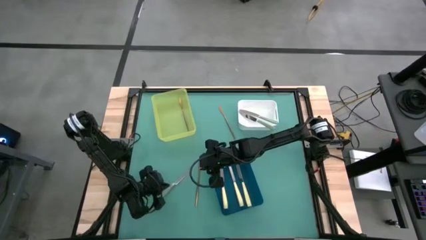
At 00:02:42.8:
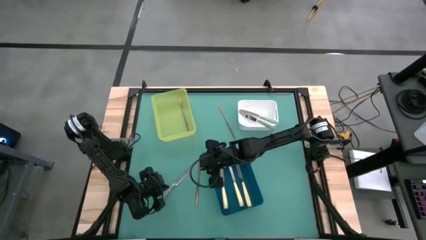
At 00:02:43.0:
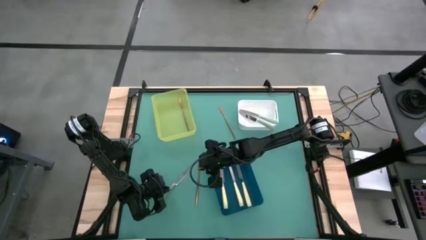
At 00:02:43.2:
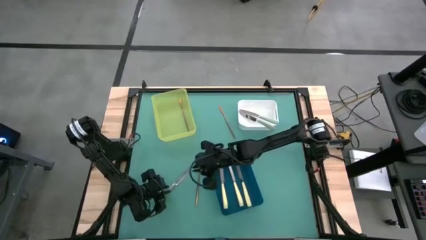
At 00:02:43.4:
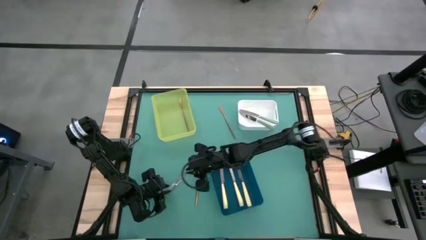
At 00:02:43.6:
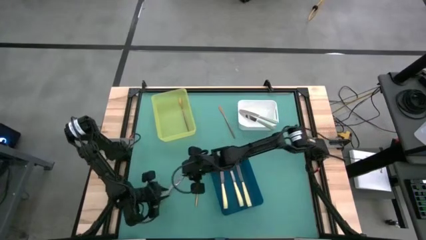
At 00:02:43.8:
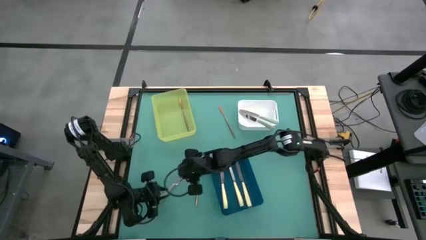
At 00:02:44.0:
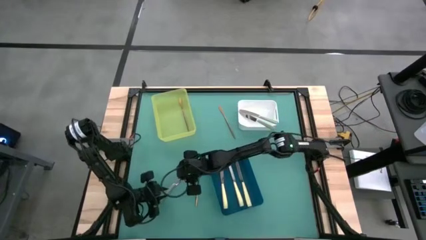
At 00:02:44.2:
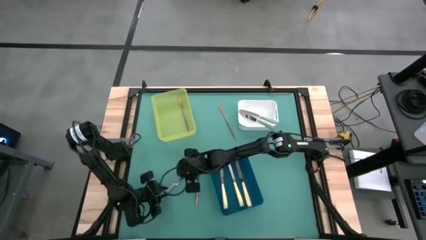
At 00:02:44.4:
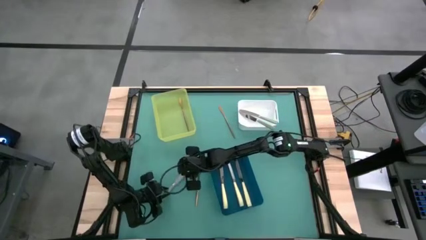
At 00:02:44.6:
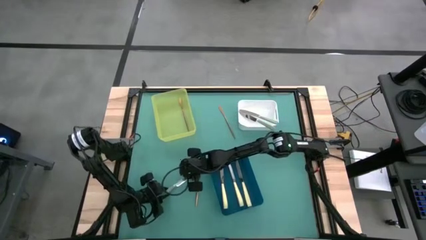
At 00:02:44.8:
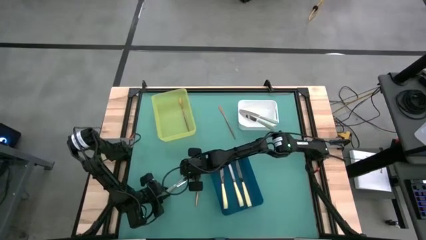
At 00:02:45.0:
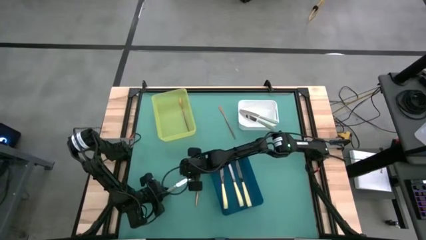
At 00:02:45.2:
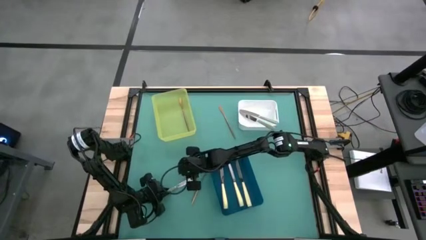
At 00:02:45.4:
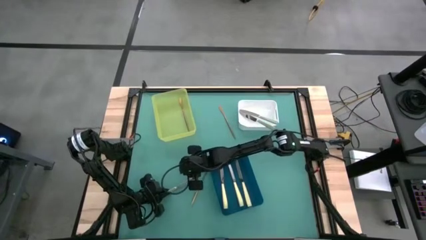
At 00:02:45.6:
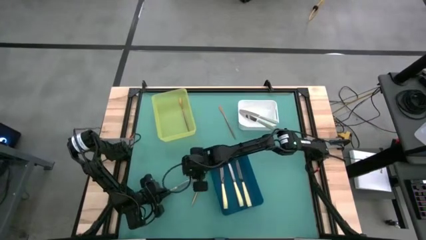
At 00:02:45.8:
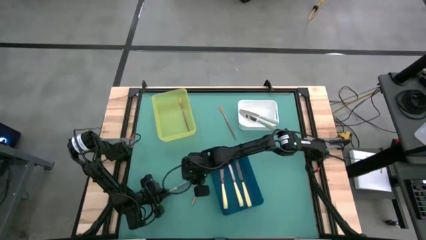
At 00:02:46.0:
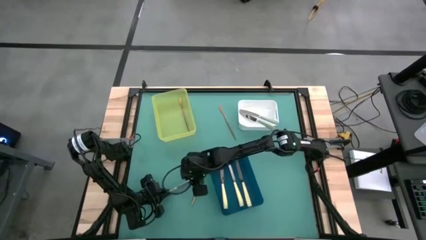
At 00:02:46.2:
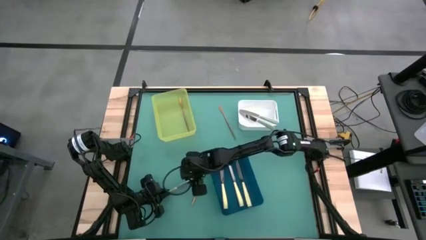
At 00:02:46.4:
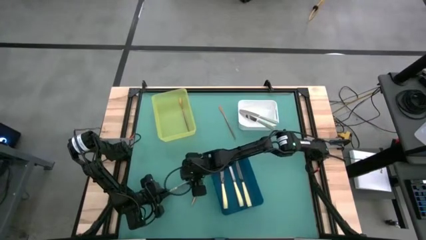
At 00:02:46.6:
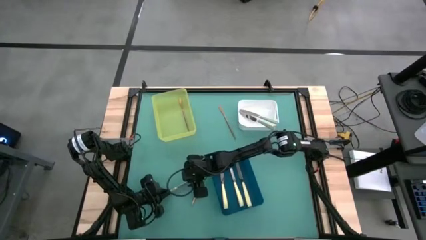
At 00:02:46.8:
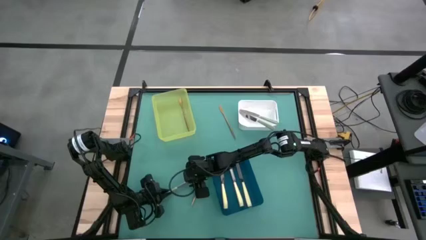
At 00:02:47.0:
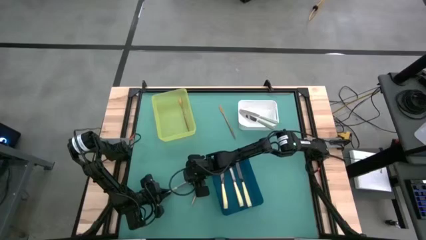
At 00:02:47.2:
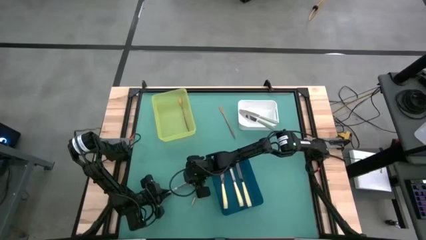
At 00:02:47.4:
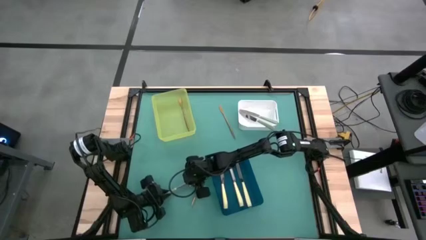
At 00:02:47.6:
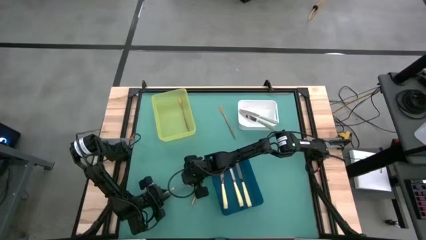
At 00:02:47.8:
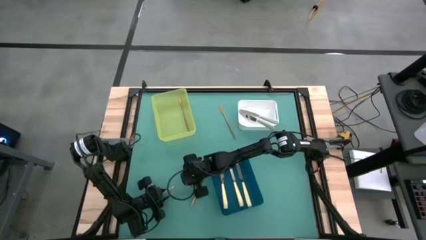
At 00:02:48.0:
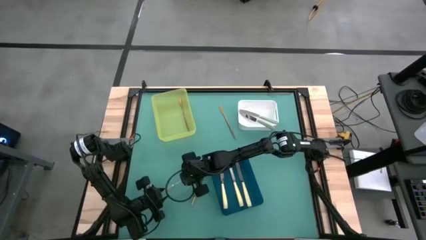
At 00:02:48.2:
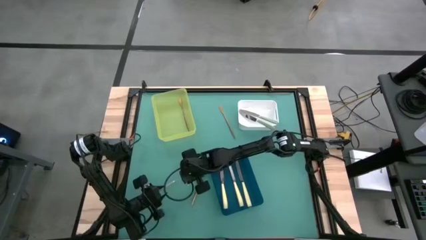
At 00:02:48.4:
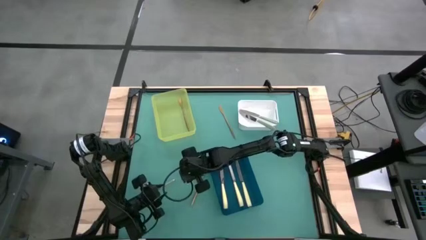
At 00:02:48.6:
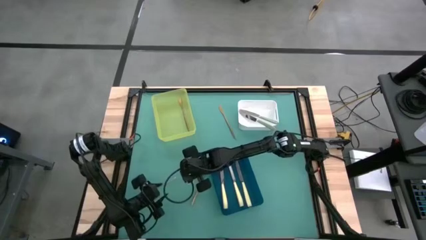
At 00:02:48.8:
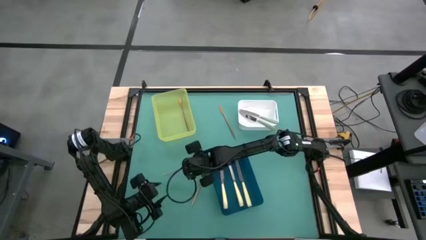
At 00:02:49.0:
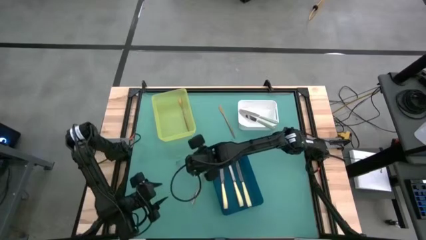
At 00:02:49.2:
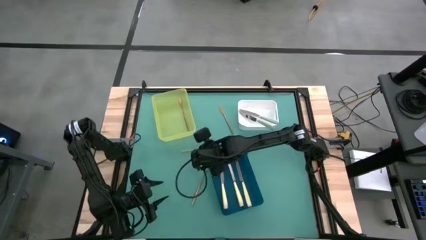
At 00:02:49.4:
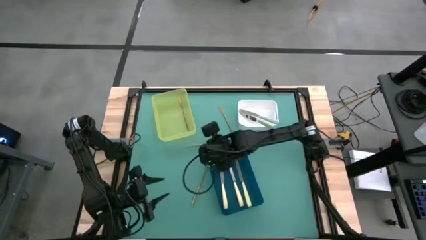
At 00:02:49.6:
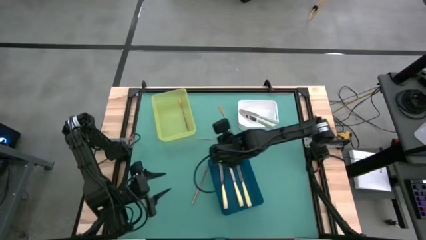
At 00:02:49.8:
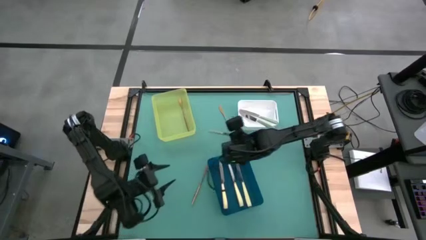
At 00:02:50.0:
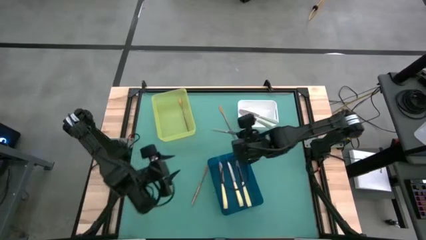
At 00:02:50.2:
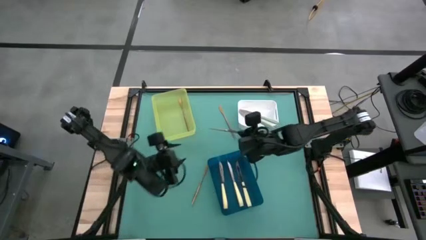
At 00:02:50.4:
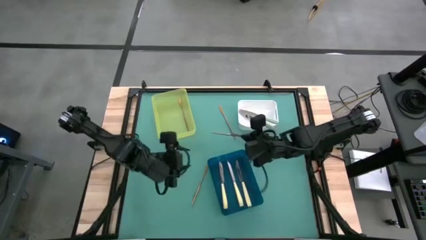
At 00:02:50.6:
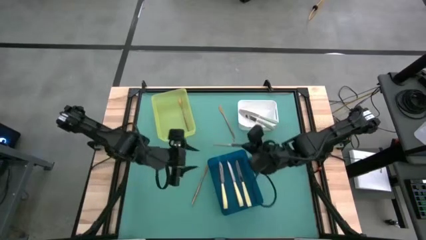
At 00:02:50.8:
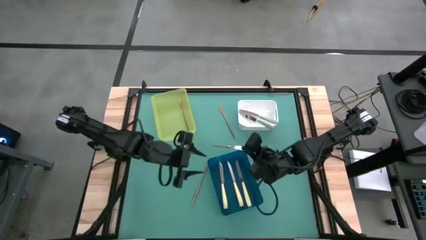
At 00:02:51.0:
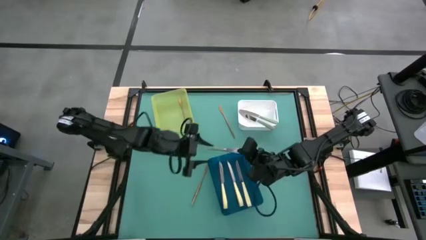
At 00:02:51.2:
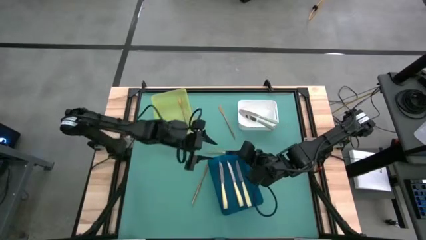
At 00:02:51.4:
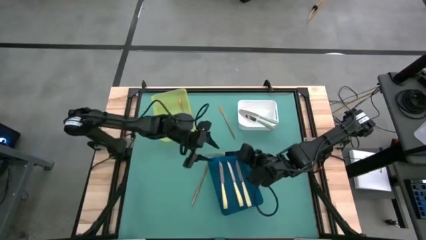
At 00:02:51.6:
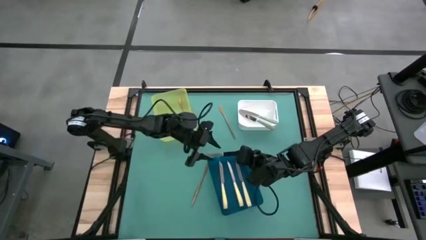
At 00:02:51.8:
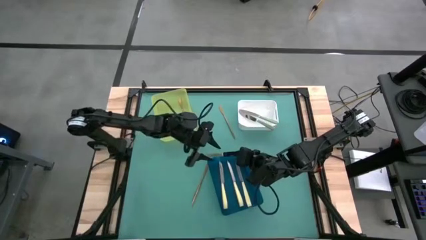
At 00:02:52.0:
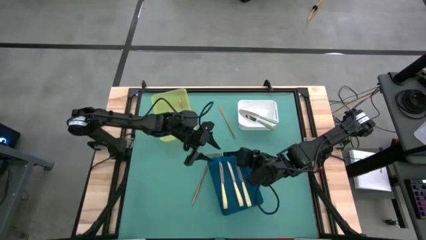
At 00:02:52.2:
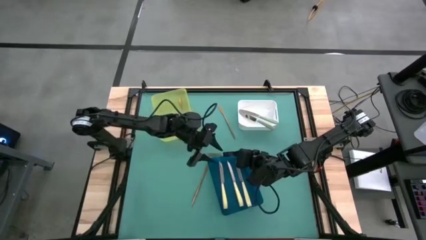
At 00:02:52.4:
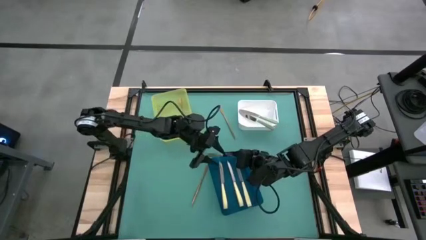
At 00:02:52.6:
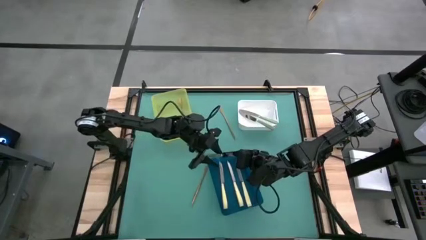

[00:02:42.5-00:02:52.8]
Task: Sort silverware by color (type)
Put the green knife into the white bin
